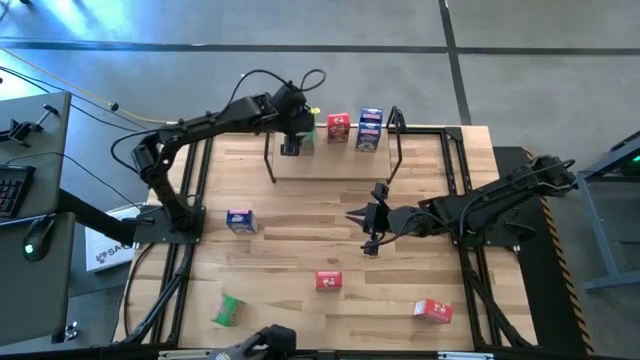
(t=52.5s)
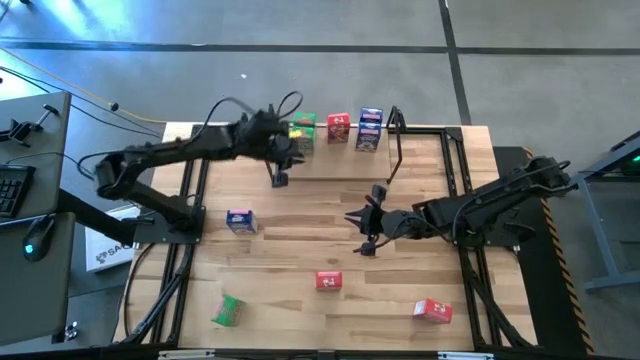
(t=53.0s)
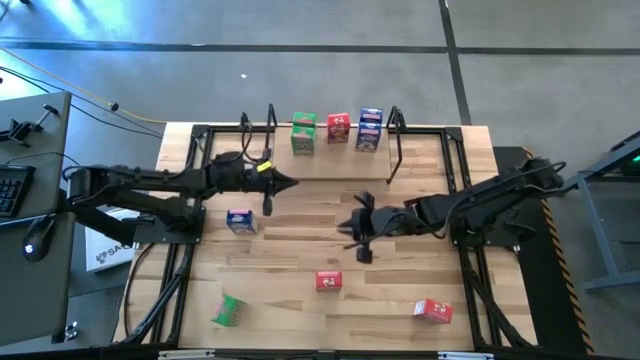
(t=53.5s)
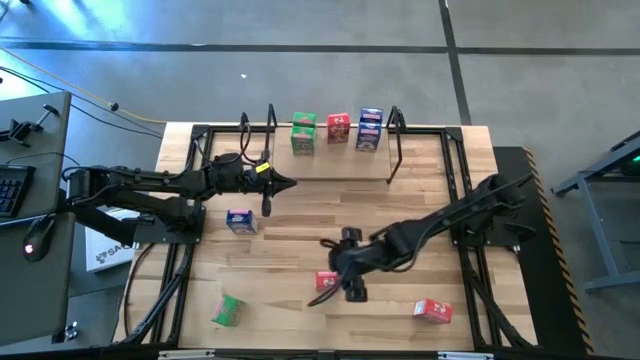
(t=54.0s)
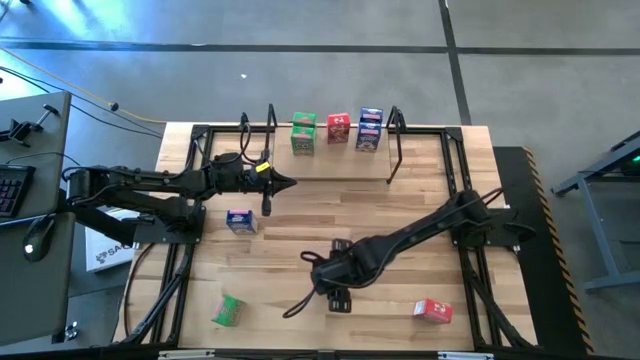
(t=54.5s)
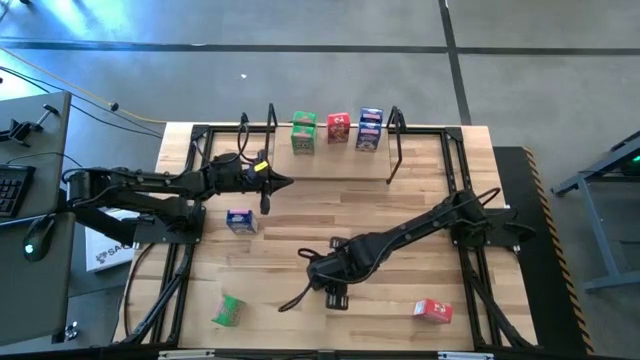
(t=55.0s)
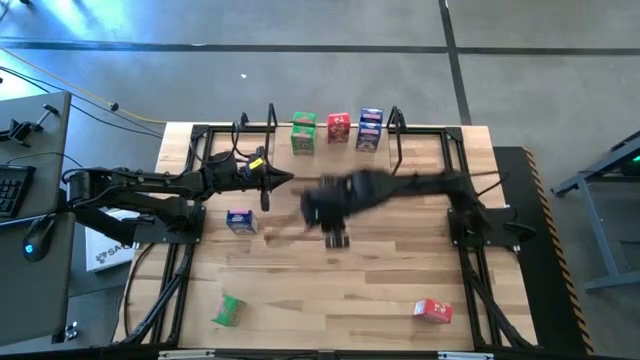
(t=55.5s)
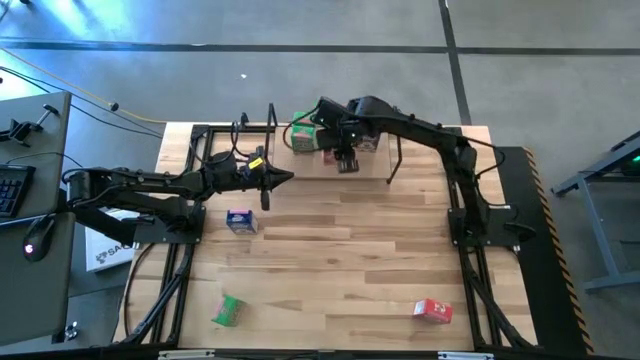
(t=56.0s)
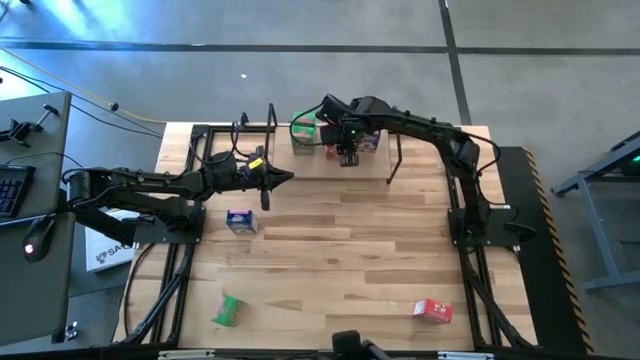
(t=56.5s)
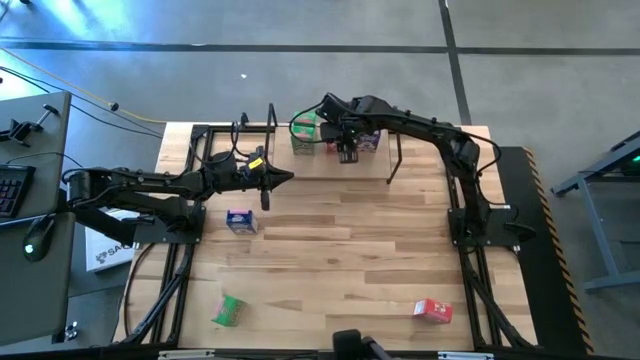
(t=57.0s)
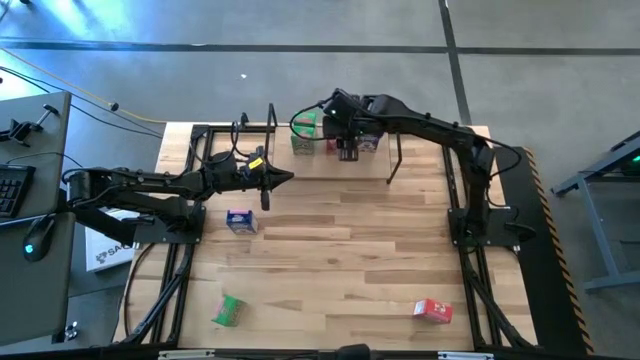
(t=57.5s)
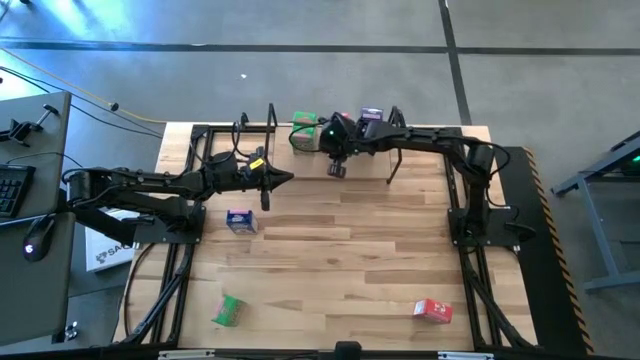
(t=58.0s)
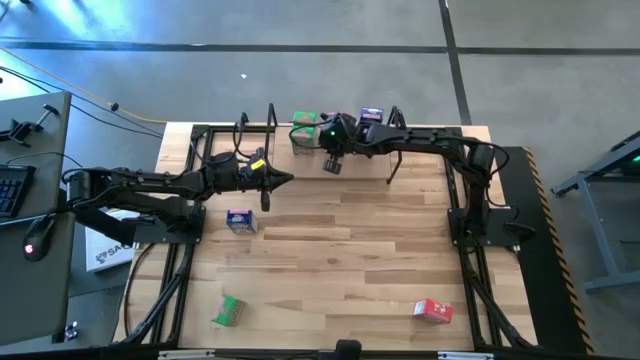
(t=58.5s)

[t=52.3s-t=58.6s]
Task: Stack cereal on shelf
Put the top red cereal box on the shelf aligned with the other red cereal box

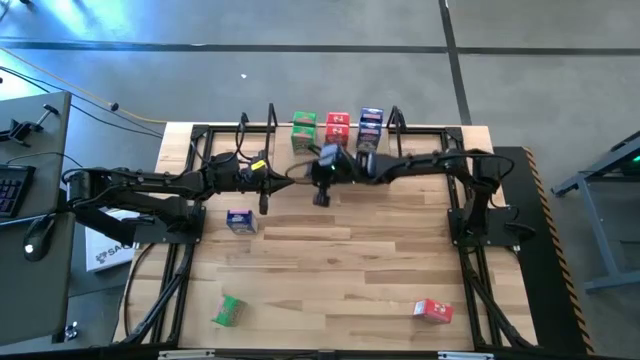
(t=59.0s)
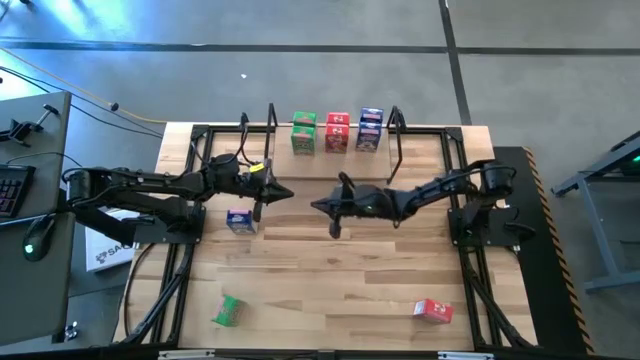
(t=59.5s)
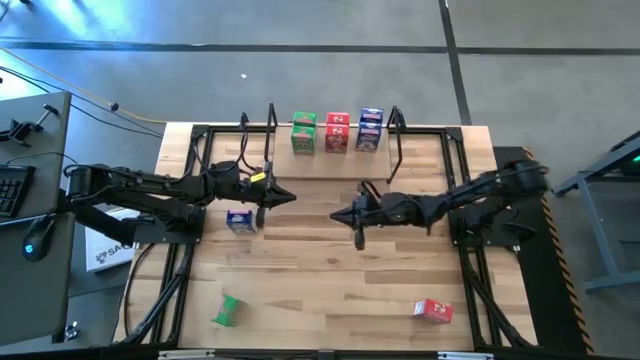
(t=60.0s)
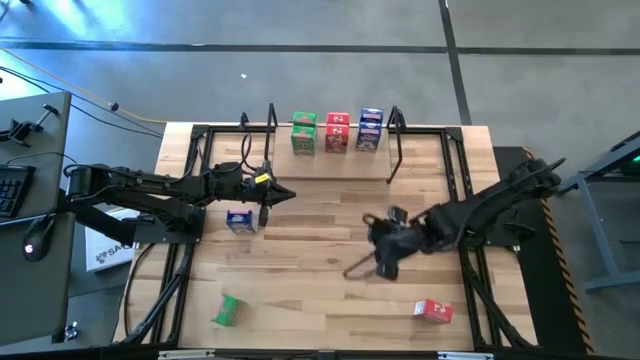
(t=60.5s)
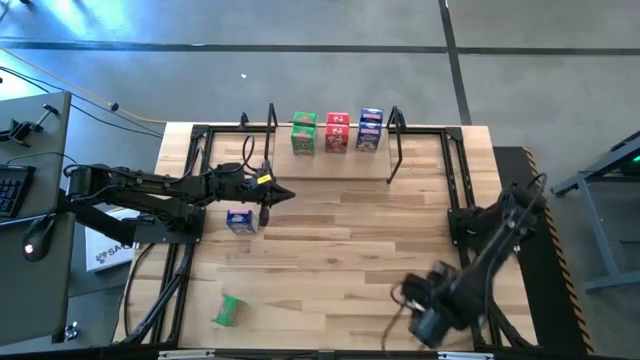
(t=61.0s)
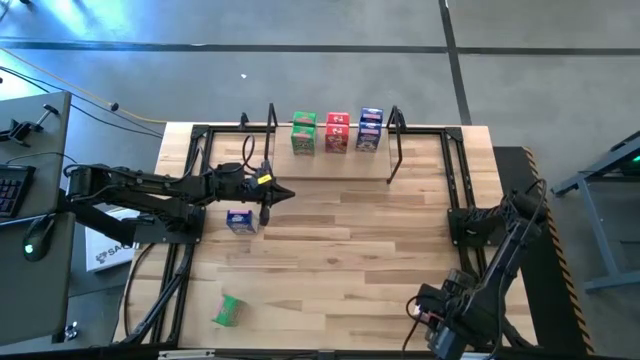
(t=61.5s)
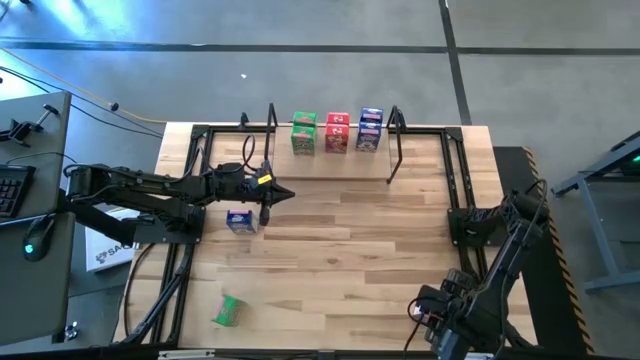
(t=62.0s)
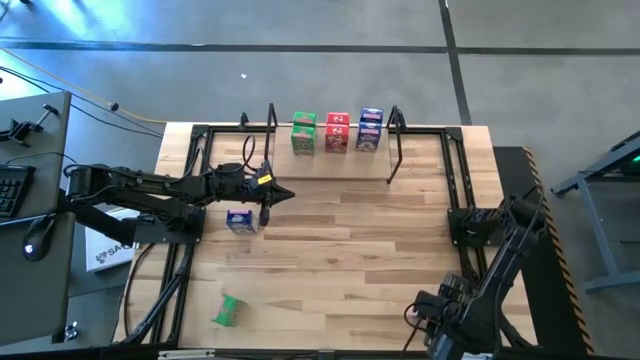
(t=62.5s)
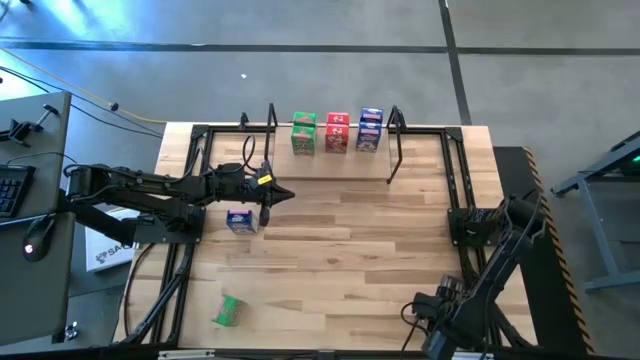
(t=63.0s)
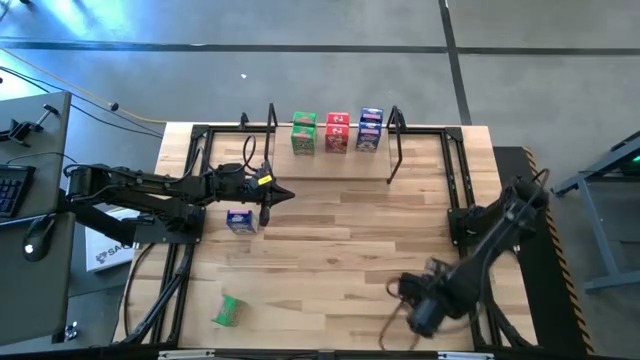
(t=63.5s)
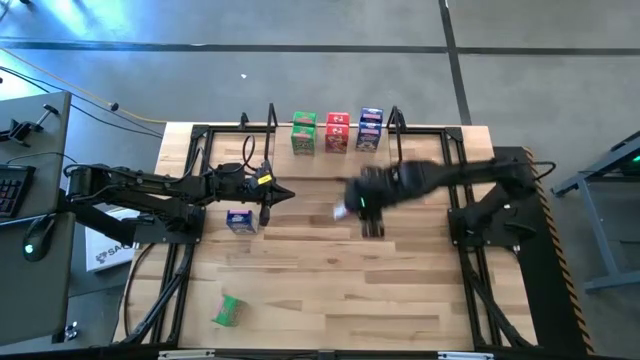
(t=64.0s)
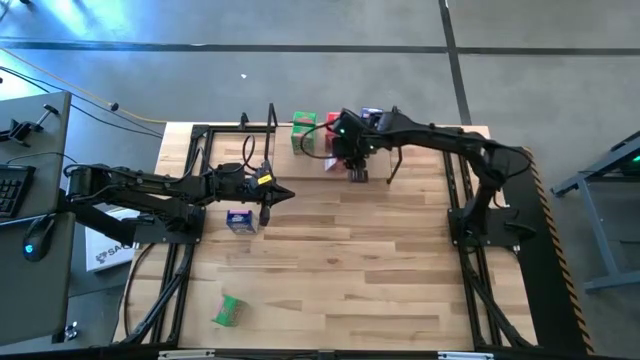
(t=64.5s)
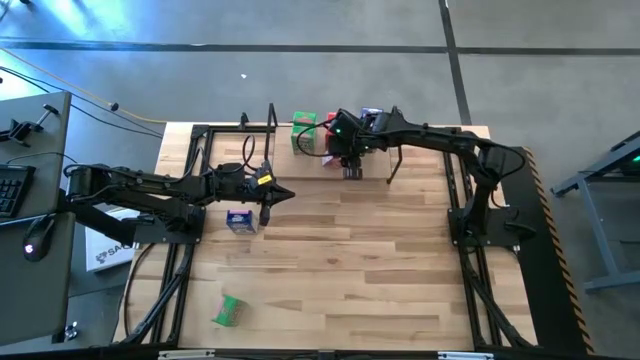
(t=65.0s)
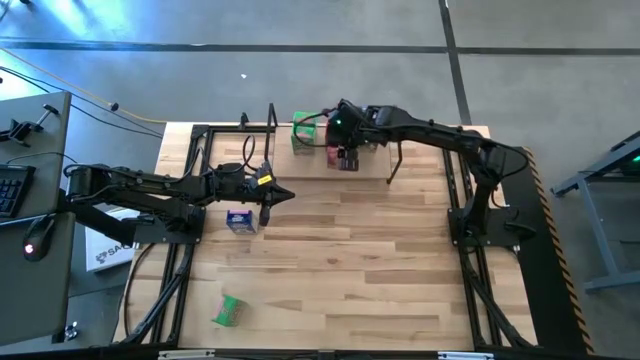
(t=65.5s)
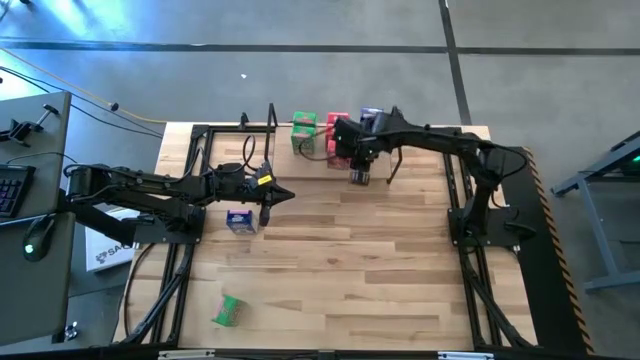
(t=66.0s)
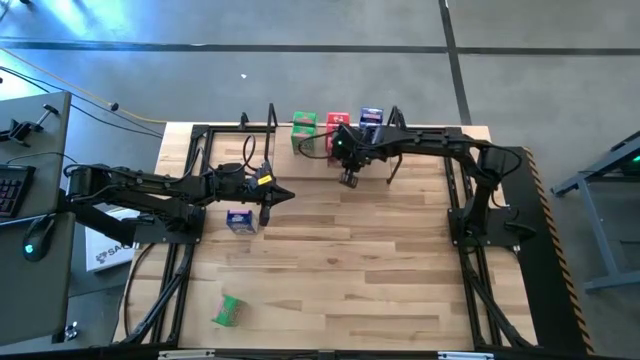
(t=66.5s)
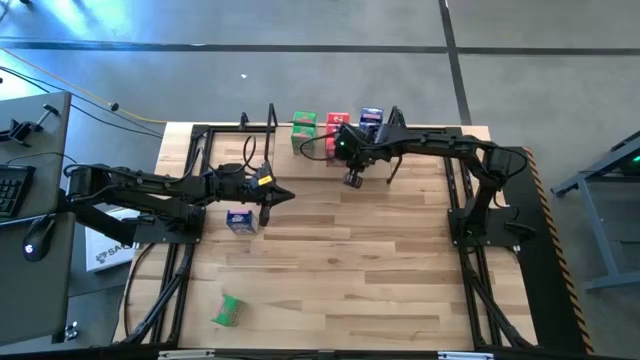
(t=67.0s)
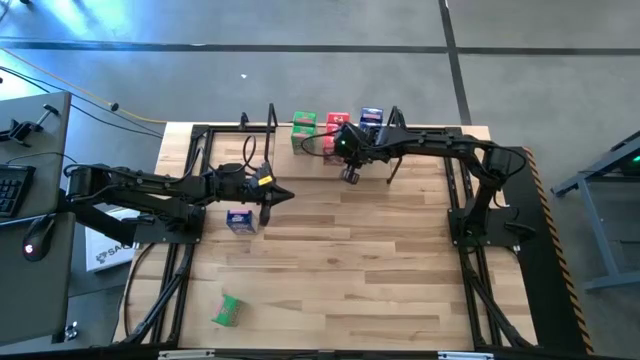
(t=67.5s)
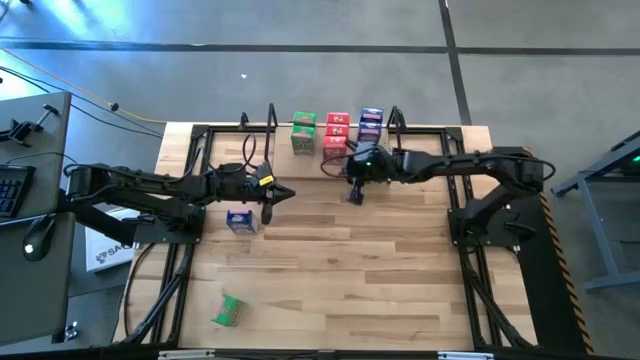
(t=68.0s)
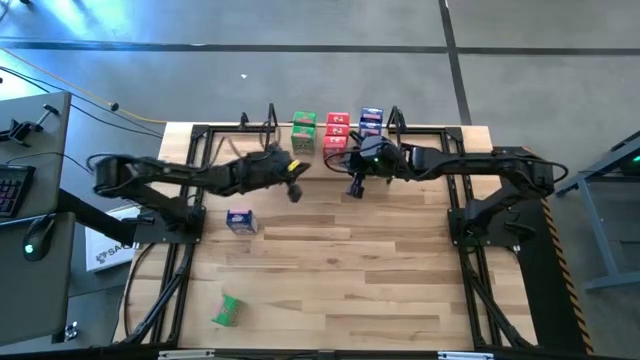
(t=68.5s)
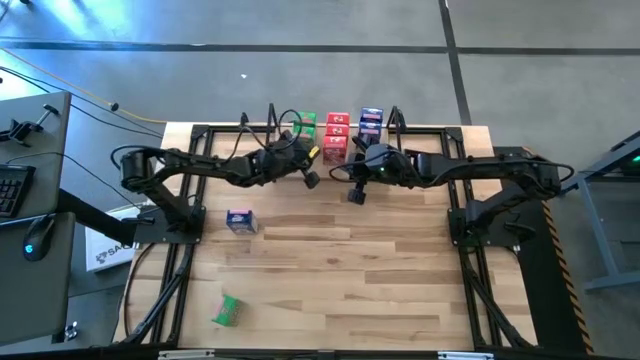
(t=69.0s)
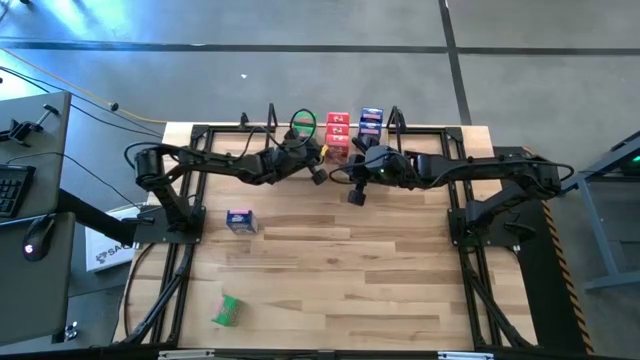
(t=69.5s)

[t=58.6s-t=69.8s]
Put the red cereal box on the shelf aligned with the other red cereal boxes

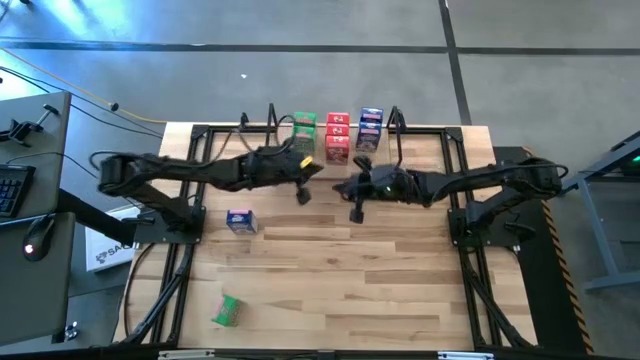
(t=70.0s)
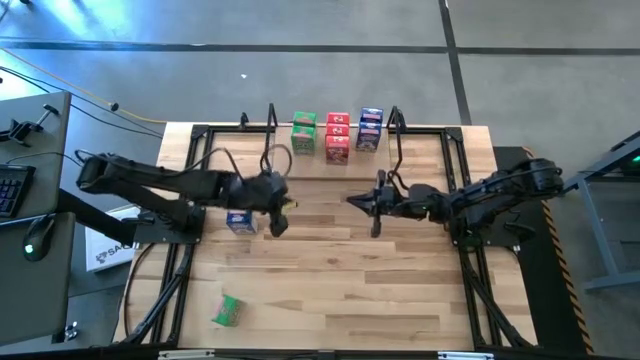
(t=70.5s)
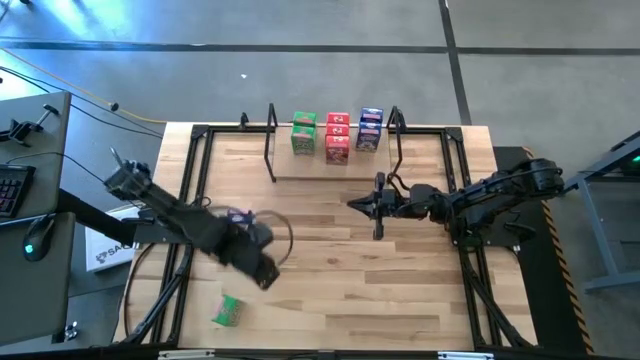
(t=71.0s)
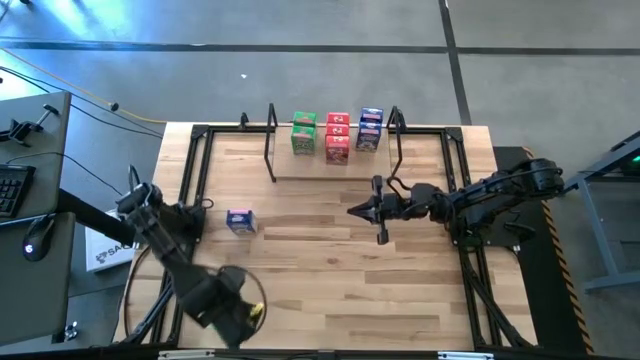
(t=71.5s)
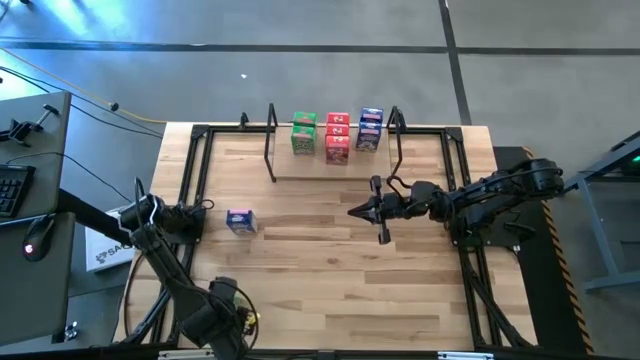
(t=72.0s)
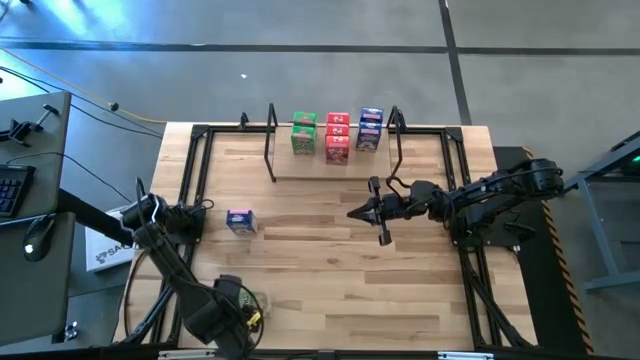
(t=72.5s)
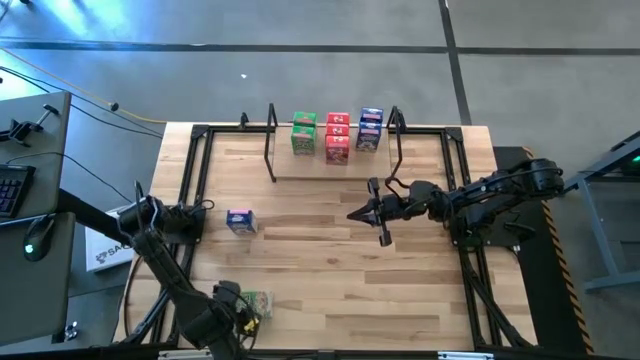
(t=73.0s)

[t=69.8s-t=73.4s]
Put the green cereal box on the shelf aligned with the other green cereal boxes

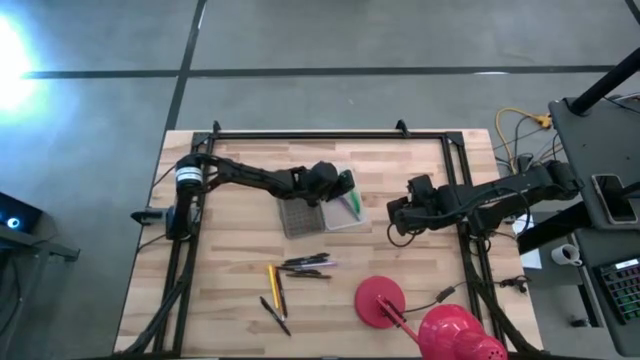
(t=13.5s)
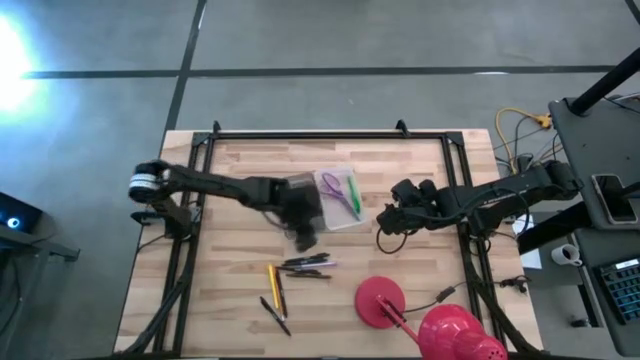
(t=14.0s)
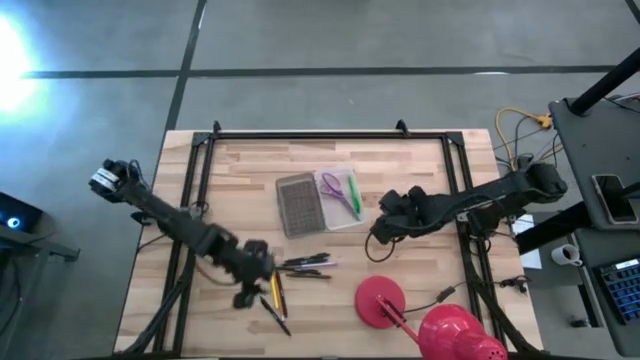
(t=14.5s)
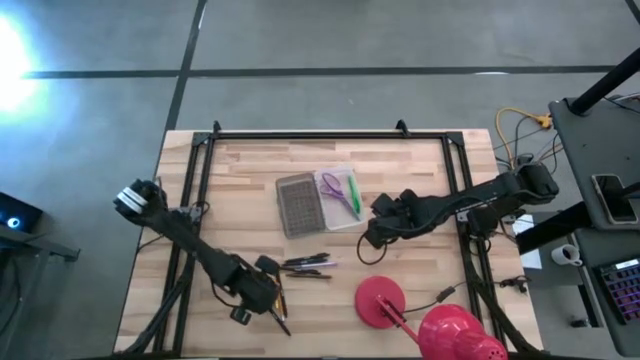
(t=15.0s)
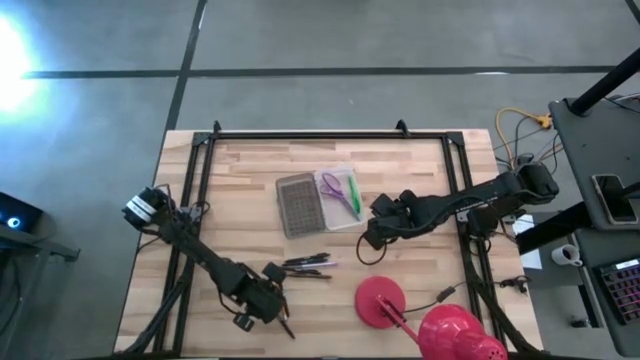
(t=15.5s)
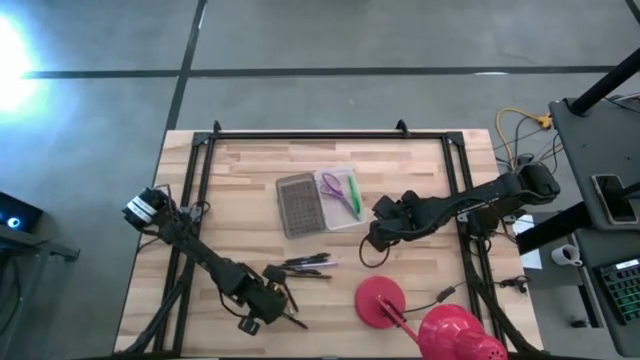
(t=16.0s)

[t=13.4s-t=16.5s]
Task: Pick & place school supplies into a supply box
Put the black pen into the black supply box
